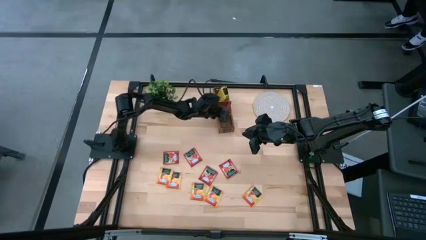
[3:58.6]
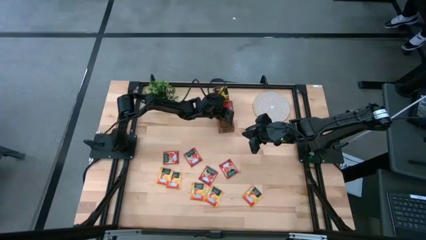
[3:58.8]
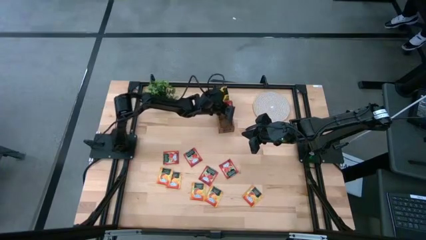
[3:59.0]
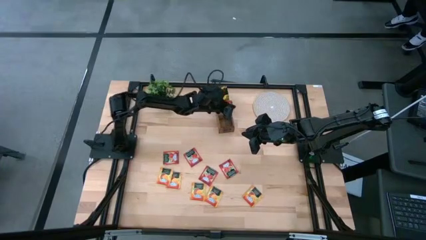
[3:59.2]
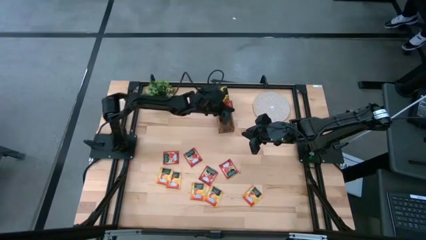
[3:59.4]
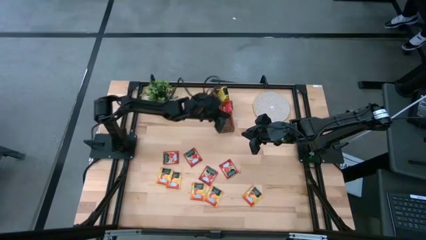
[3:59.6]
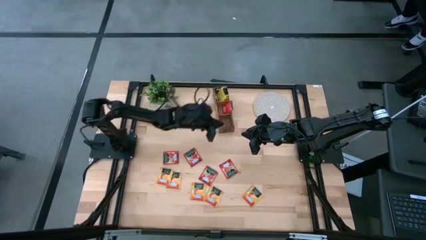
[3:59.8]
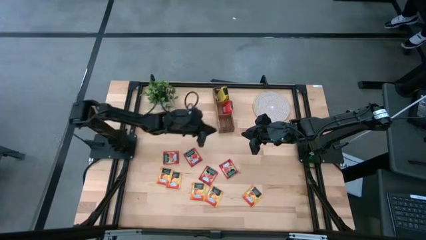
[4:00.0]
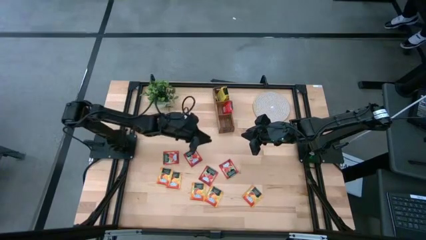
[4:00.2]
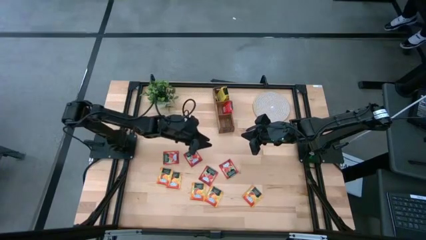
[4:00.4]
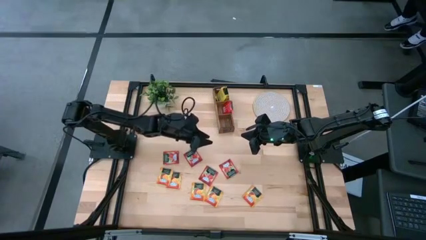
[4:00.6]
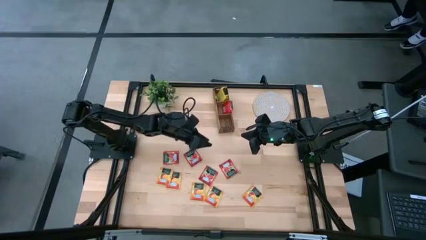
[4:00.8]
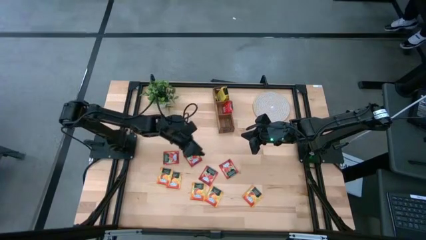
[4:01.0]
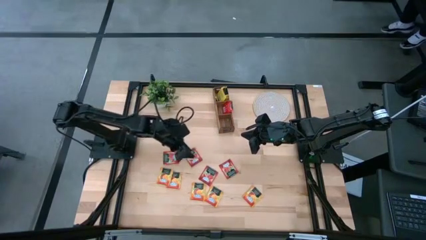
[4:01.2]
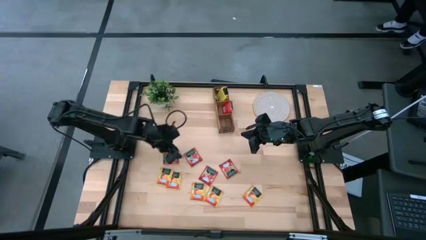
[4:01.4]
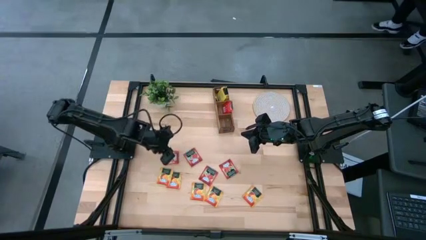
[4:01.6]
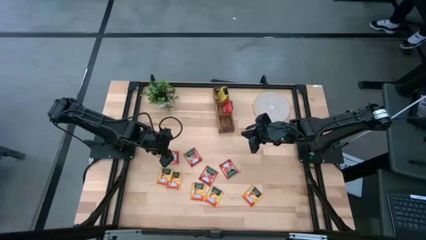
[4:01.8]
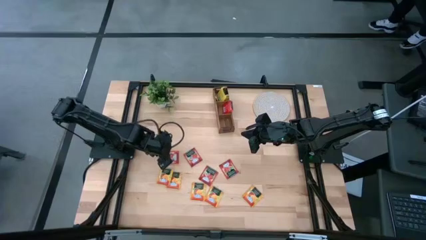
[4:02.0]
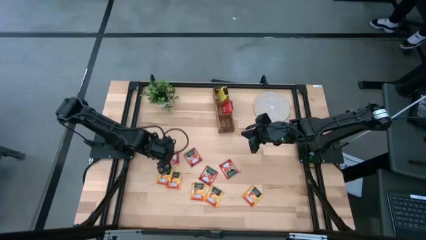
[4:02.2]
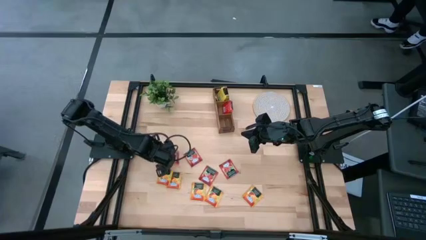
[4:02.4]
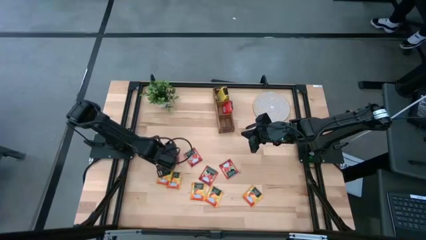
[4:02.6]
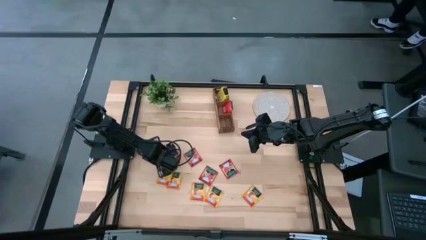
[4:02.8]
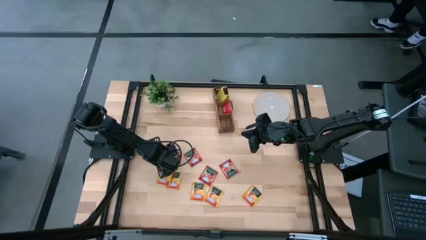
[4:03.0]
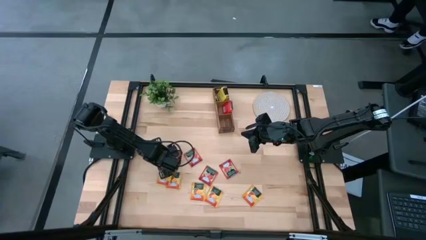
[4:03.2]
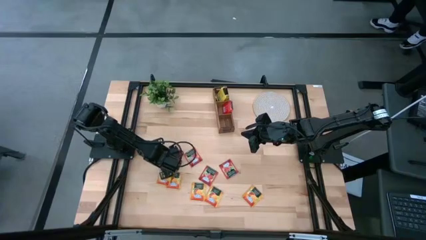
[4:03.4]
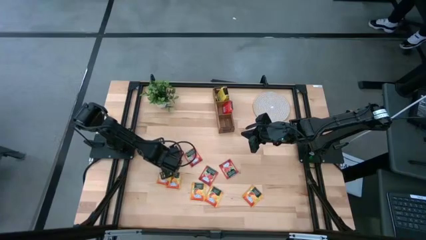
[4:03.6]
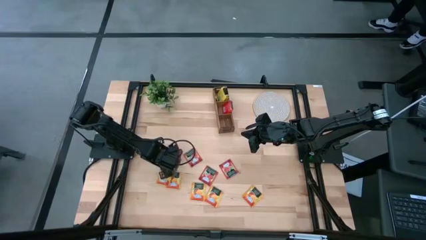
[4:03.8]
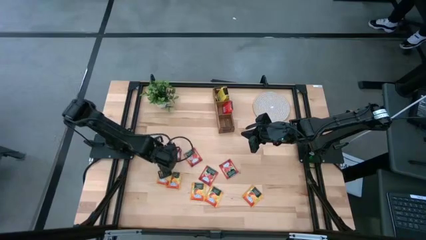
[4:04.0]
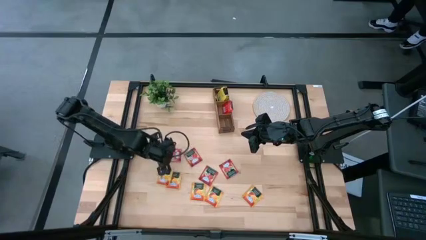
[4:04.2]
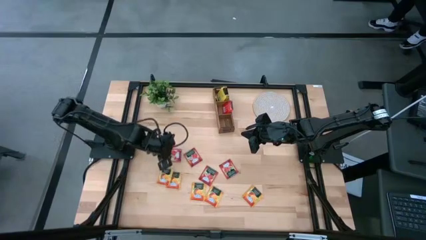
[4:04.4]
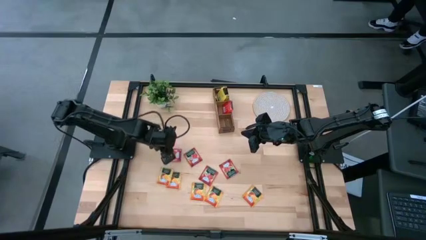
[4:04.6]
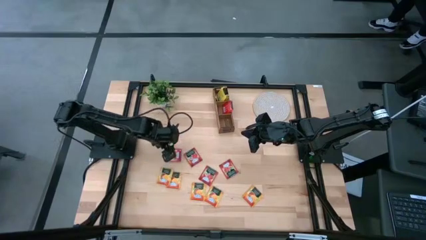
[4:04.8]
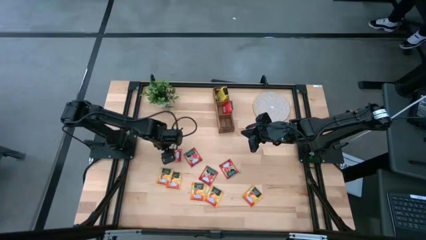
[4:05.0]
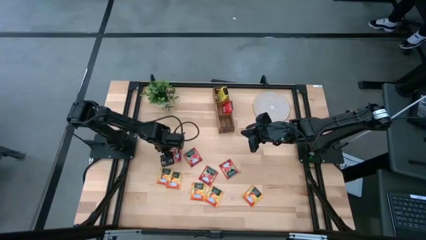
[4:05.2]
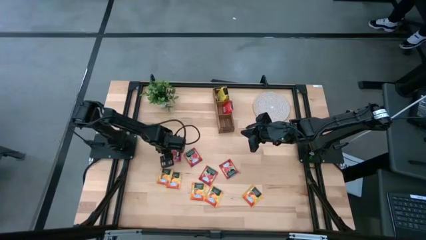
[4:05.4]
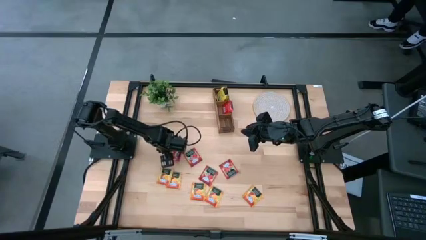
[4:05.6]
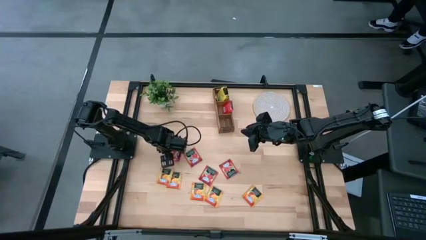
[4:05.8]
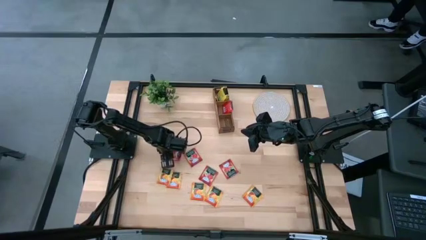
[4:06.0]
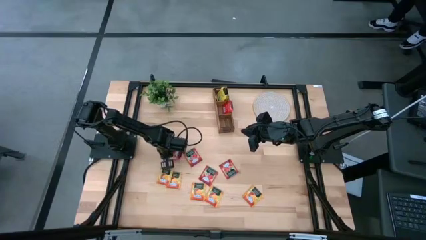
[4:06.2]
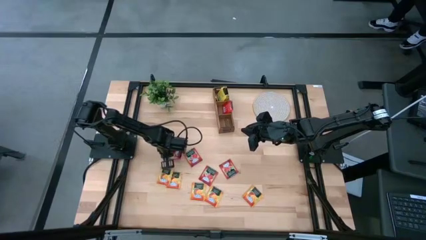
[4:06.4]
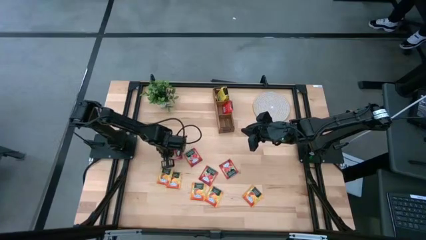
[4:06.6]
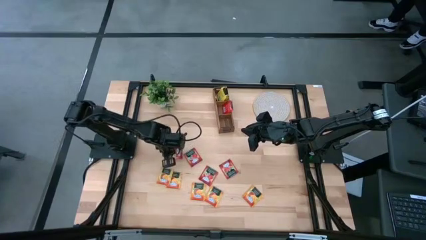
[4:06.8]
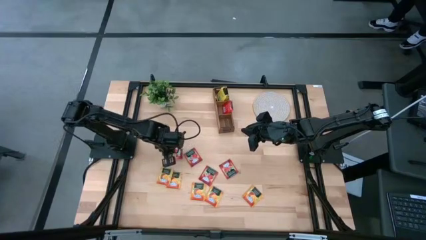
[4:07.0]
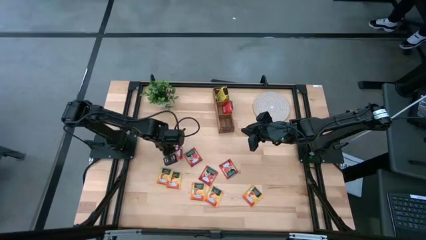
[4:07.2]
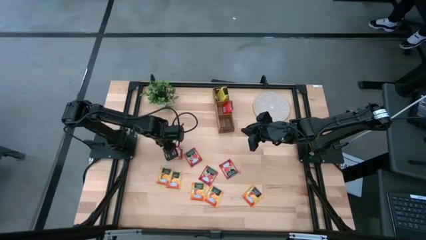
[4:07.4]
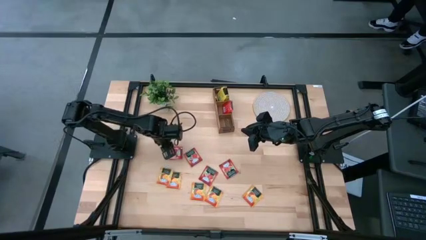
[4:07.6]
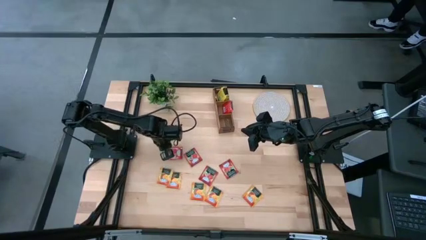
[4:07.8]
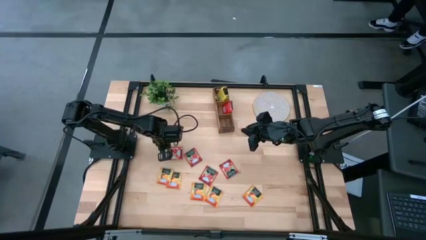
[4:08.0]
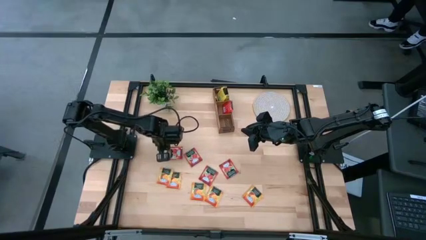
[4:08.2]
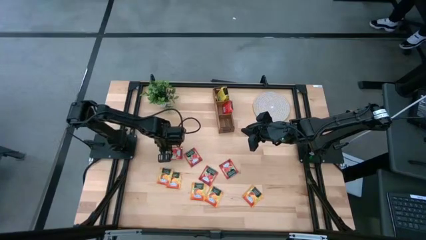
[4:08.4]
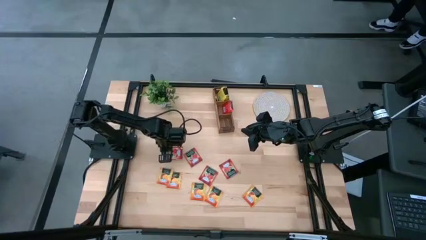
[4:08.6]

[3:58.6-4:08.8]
Task: Pick & Place Tea
Put the red tea bag into the middle section of the wooden organizer

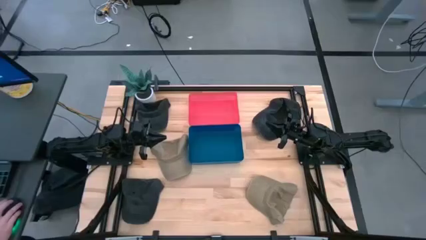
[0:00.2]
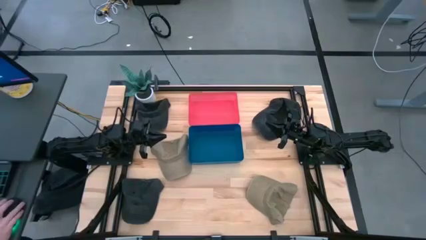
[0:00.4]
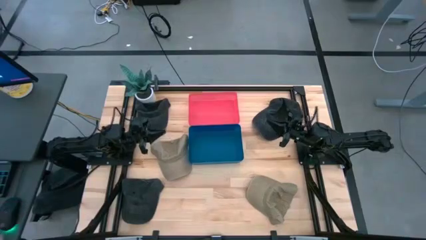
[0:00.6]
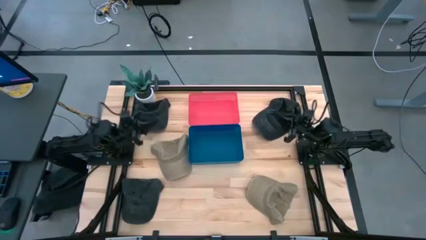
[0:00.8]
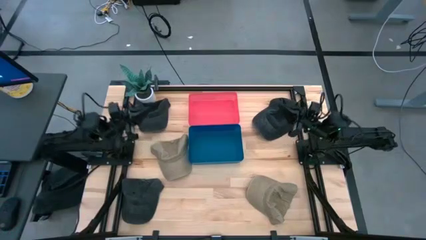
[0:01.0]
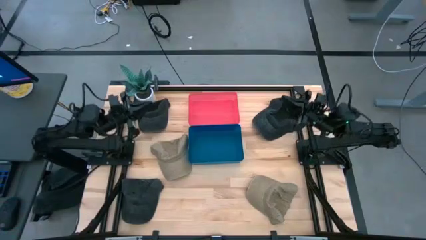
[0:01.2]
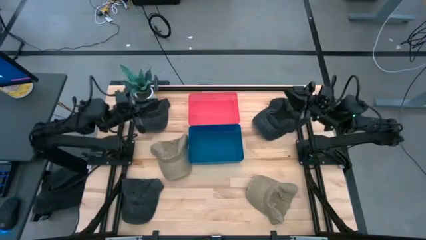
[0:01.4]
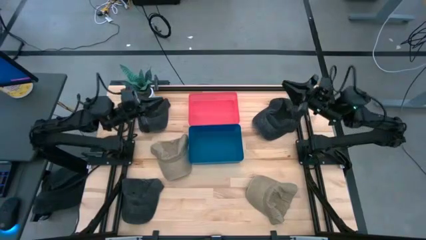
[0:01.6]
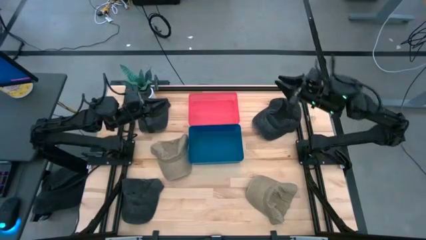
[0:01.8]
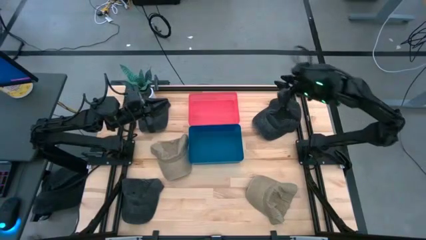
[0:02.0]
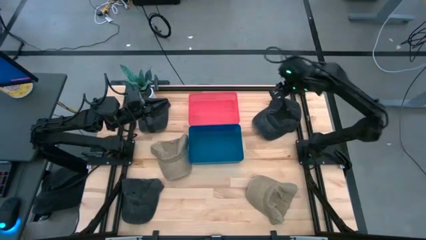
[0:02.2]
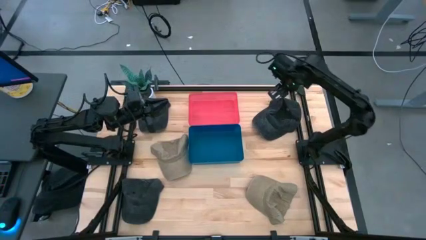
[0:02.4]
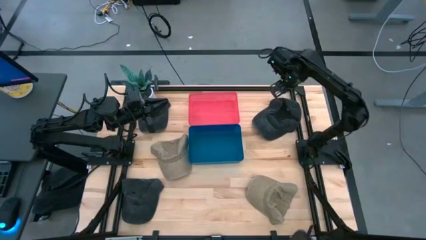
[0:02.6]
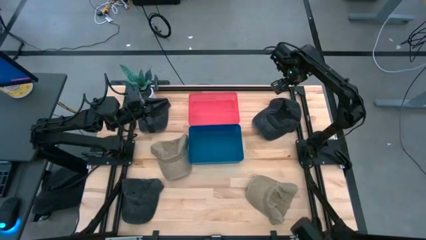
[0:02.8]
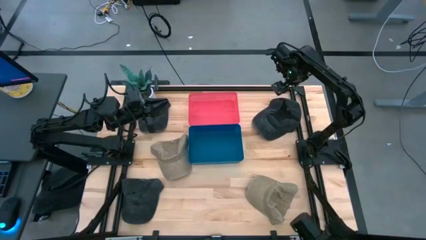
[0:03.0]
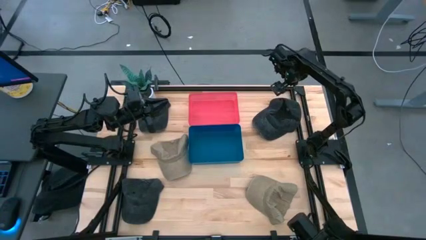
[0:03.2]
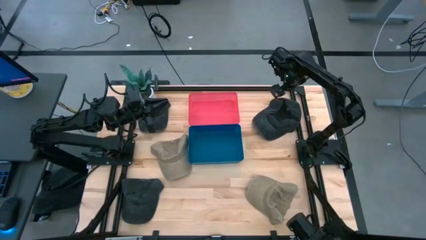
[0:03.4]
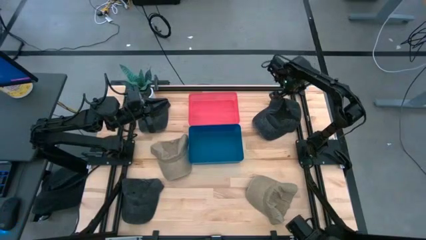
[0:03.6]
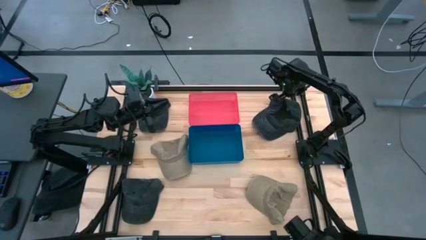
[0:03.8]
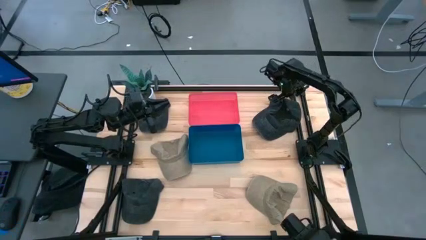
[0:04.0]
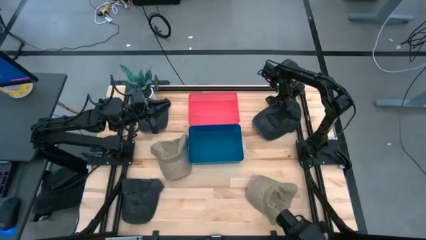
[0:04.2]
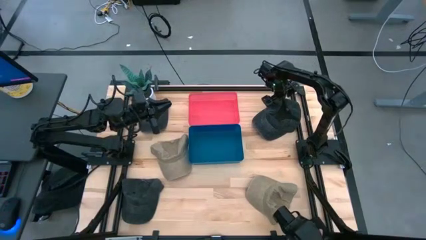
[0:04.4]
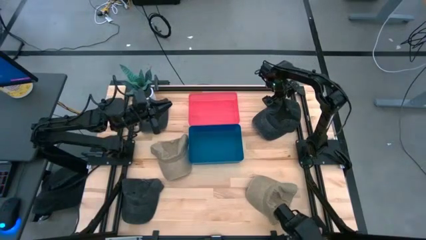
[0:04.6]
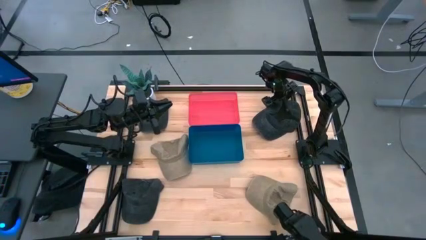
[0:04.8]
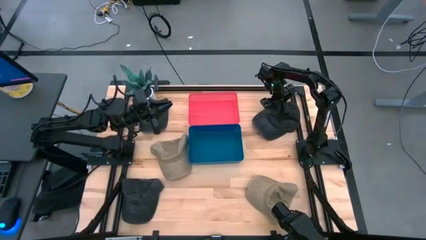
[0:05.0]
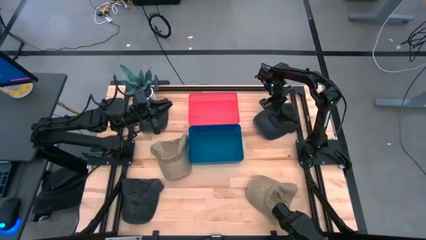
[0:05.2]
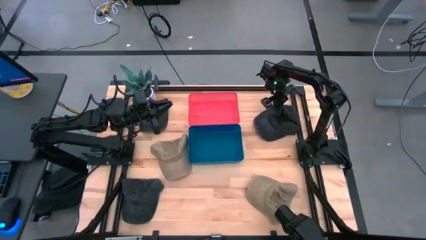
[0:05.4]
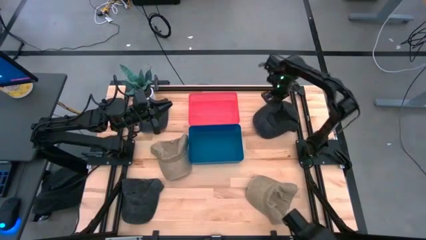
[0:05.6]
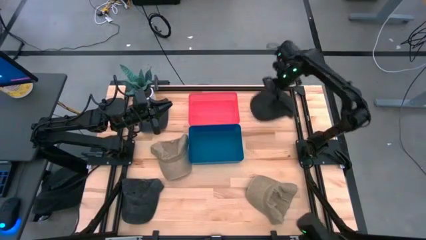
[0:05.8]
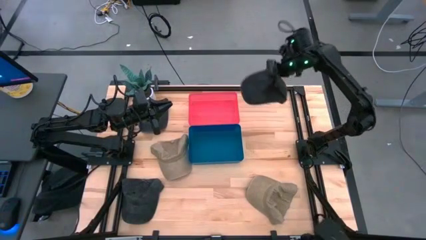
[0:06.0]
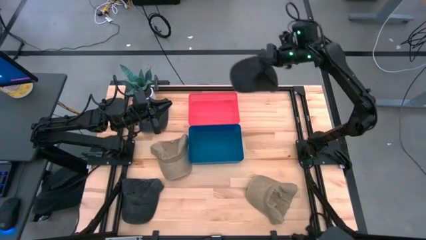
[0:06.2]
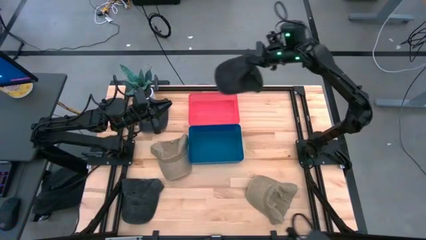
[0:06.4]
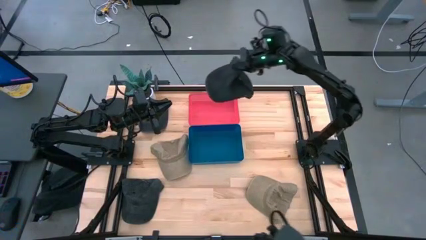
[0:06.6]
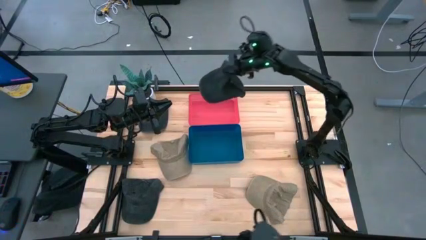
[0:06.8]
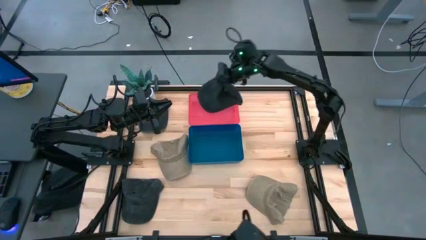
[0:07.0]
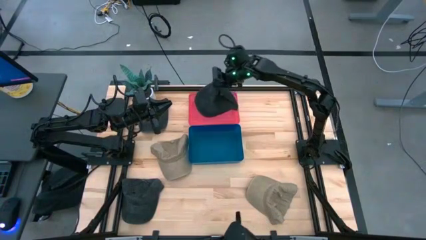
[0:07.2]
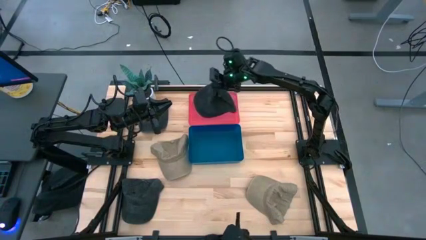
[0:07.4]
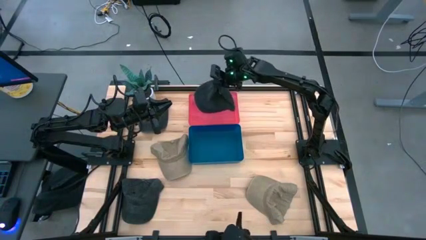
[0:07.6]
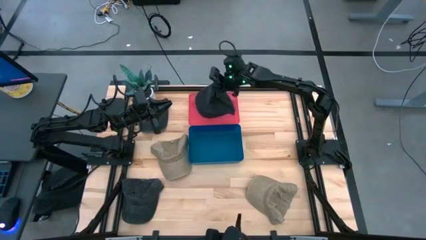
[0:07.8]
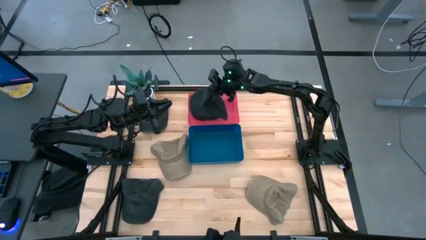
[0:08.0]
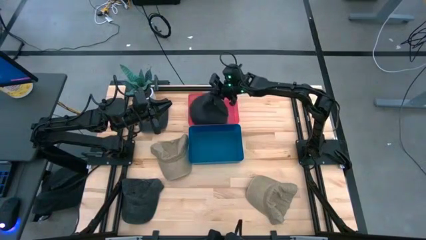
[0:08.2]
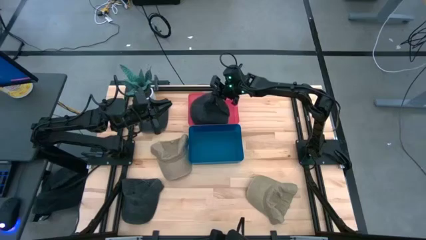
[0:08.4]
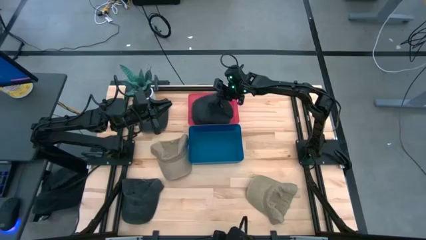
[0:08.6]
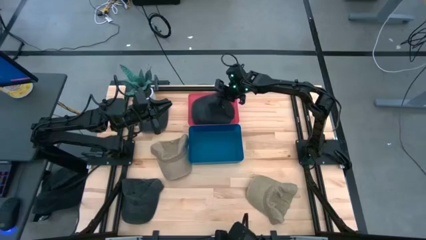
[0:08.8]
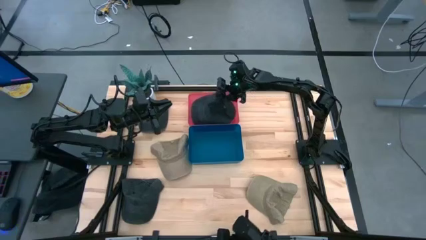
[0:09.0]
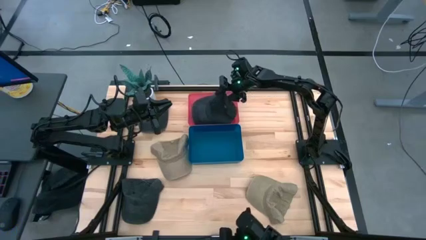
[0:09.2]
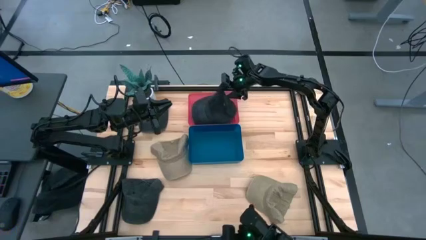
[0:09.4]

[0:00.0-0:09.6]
Task: Pick & Place hat
Put the top right black cap into the red bin
